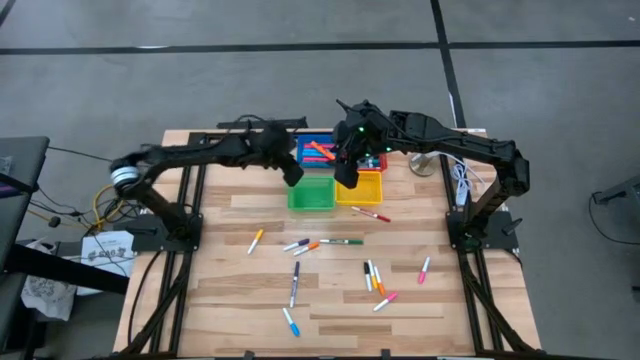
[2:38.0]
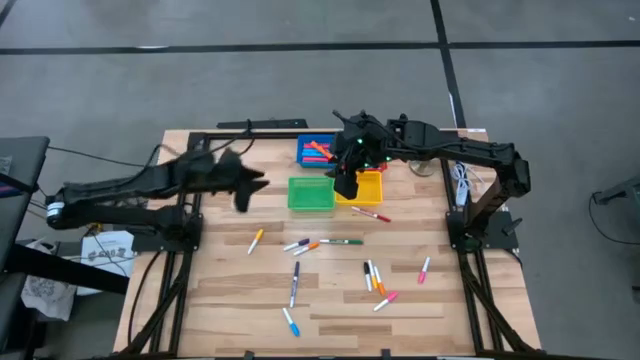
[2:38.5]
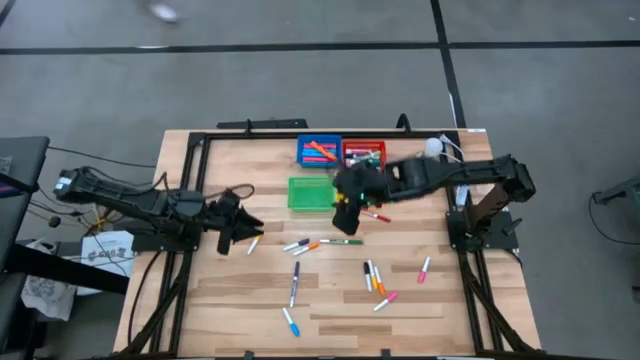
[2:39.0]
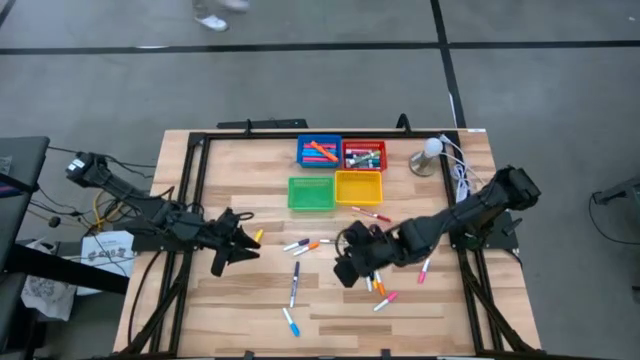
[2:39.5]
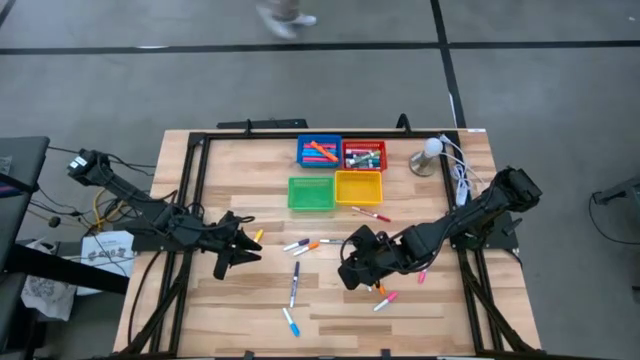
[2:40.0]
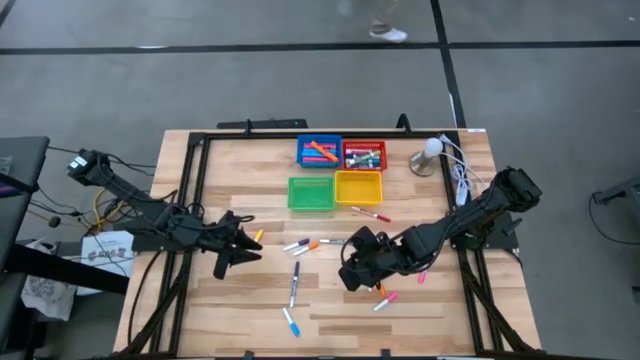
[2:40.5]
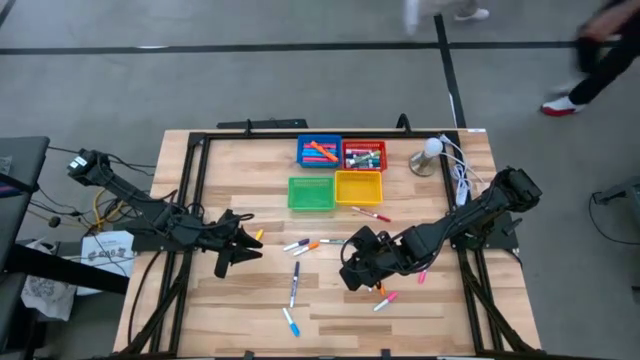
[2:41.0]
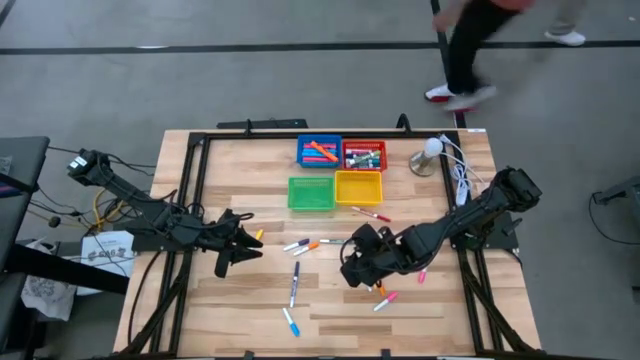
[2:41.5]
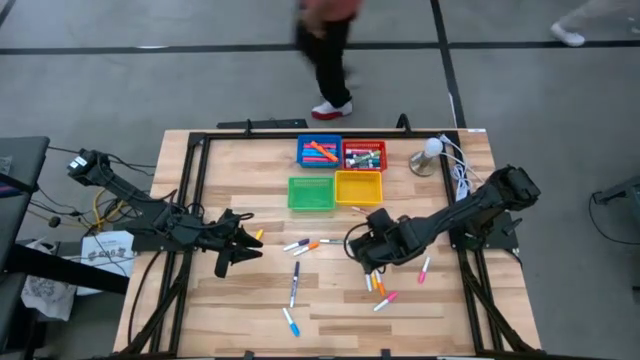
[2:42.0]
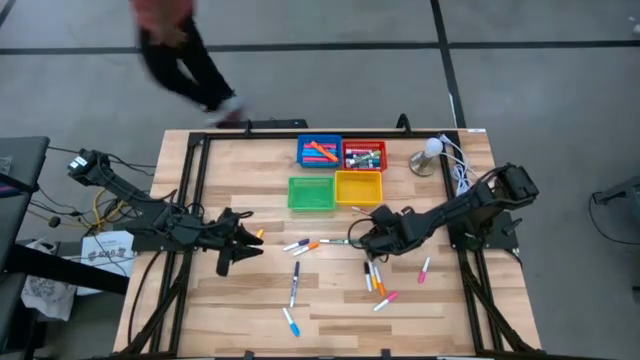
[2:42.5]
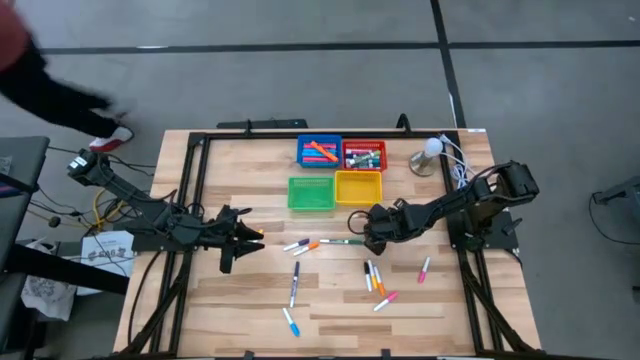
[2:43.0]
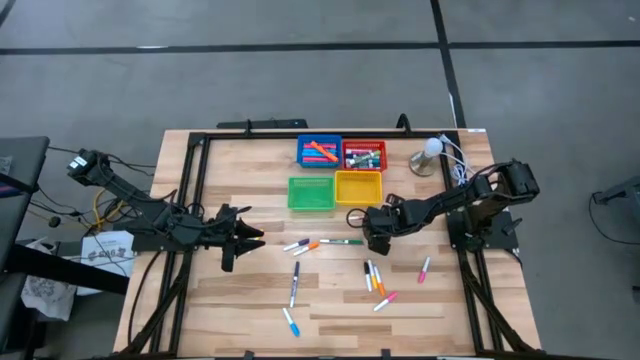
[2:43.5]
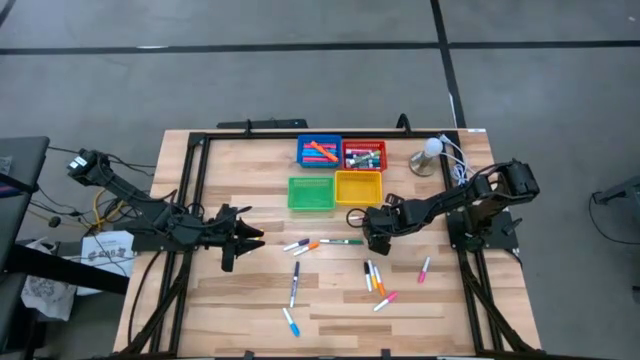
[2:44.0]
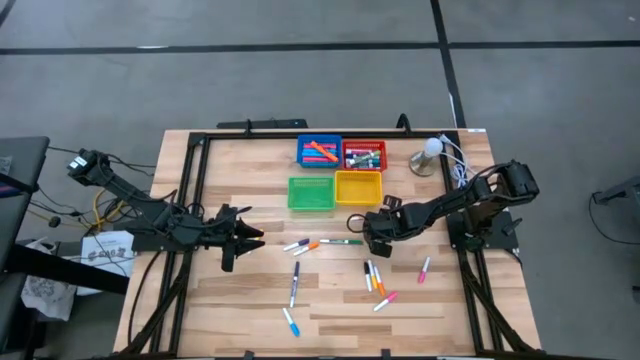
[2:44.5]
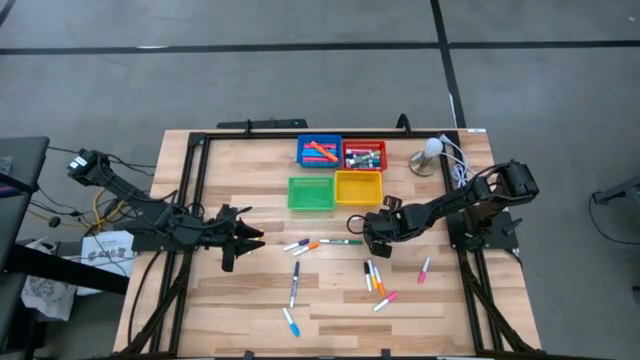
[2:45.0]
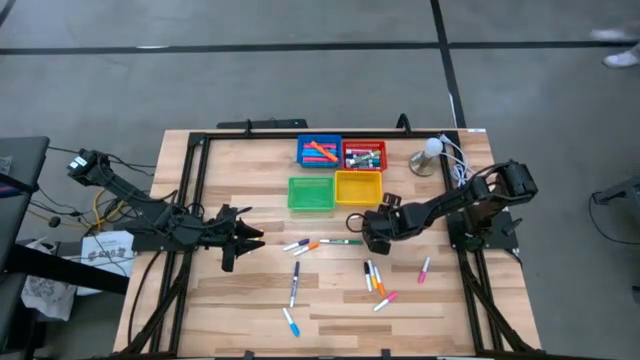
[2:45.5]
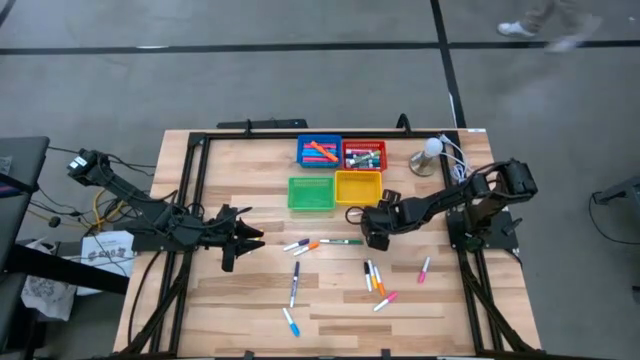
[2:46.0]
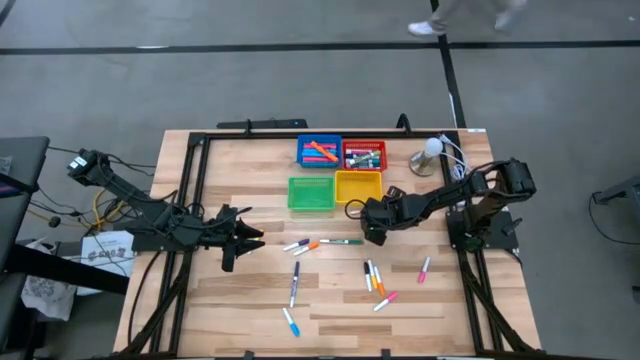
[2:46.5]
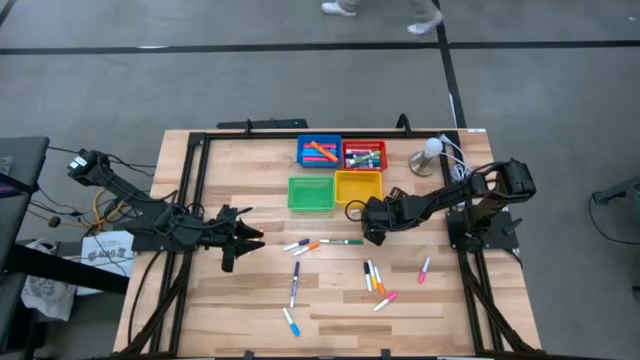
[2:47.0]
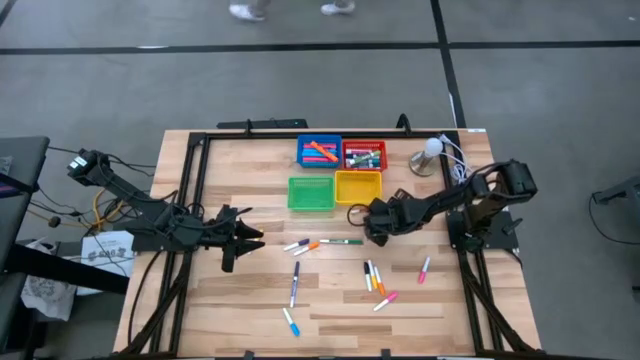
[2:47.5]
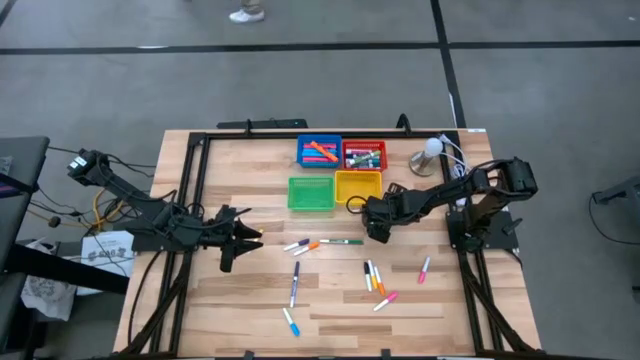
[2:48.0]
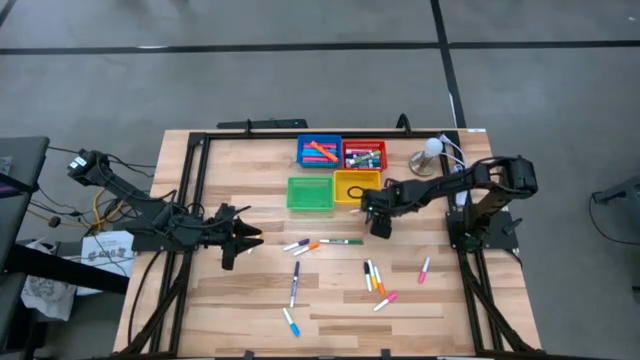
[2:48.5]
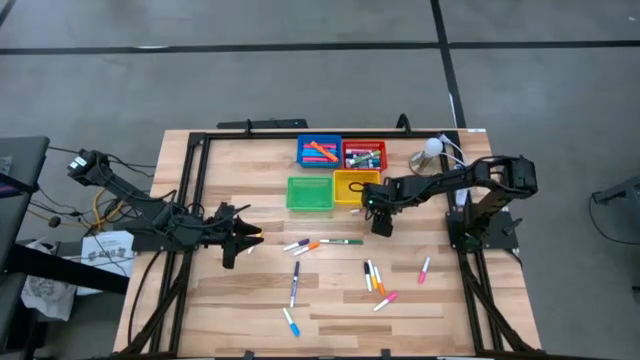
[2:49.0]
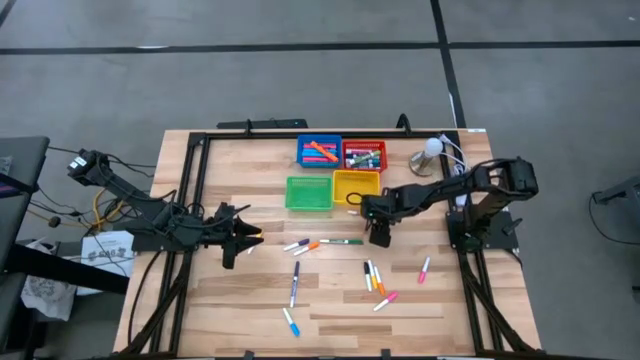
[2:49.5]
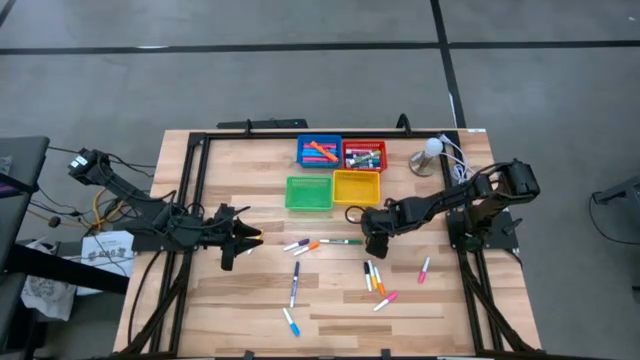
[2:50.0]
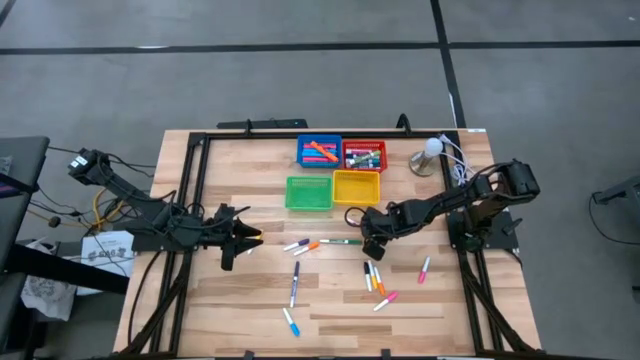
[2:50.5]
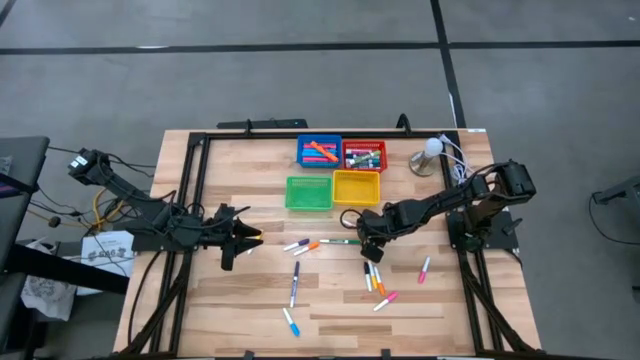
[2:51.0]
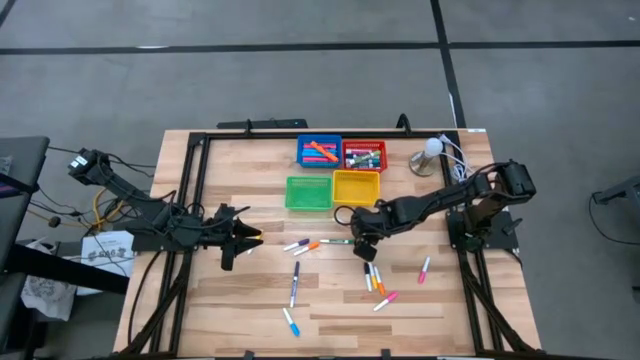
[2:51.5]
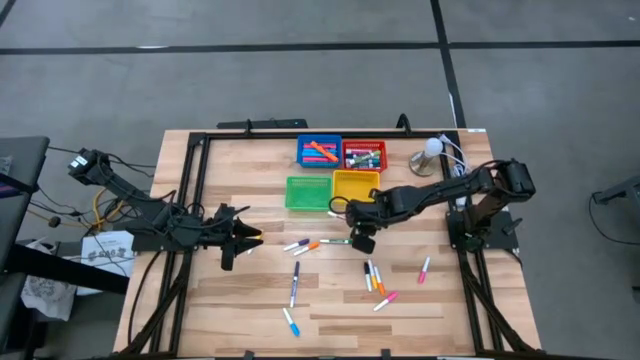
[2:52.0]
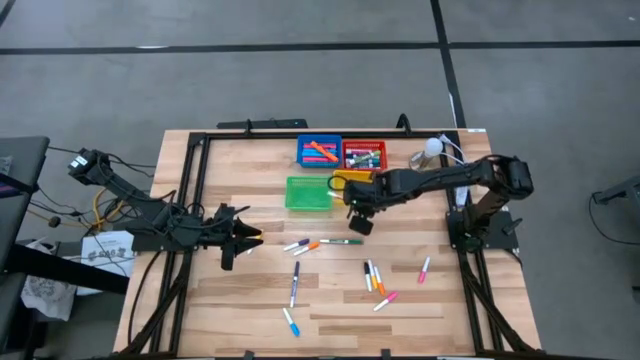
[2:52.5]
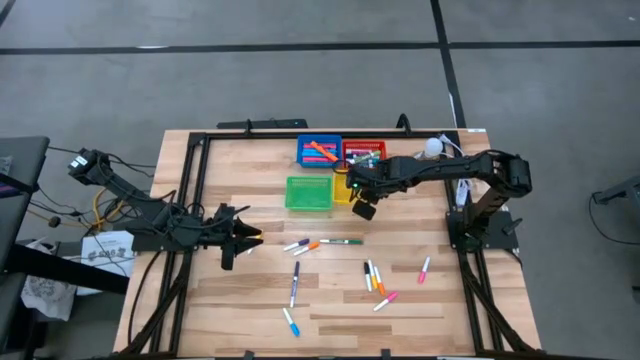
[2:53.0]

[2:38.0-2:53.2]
Task: Pick & Place Markers
Put the red thin dry erase marker into the yellow bin

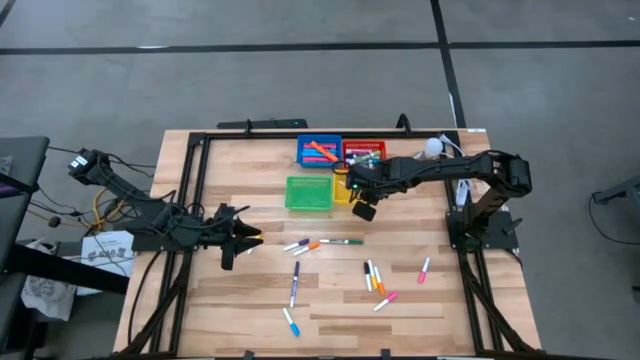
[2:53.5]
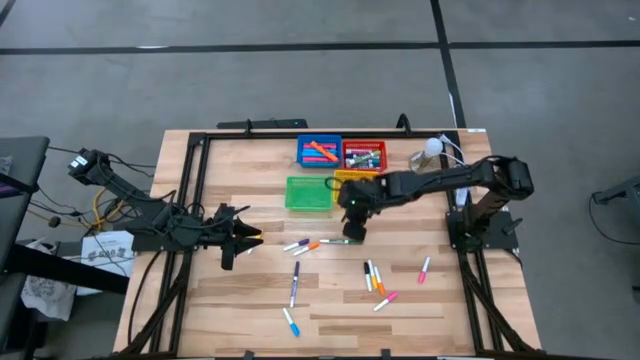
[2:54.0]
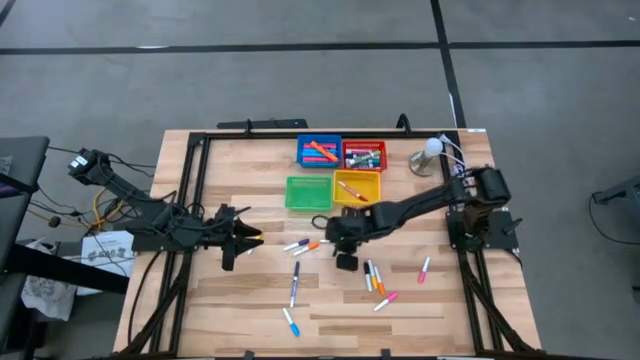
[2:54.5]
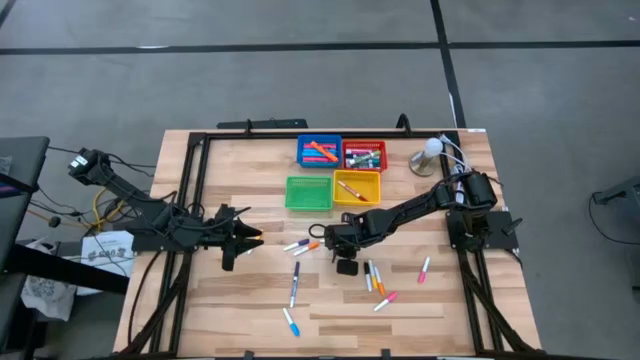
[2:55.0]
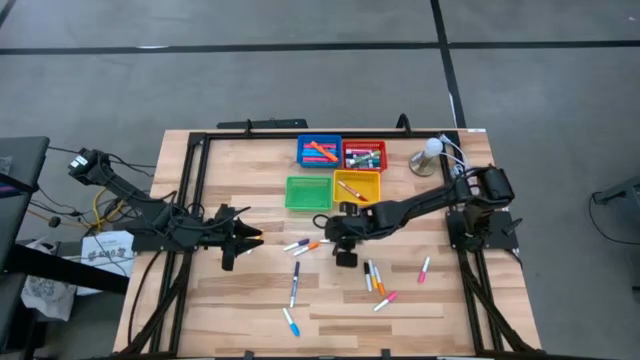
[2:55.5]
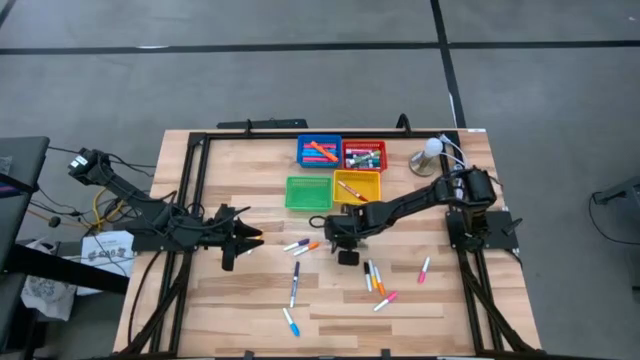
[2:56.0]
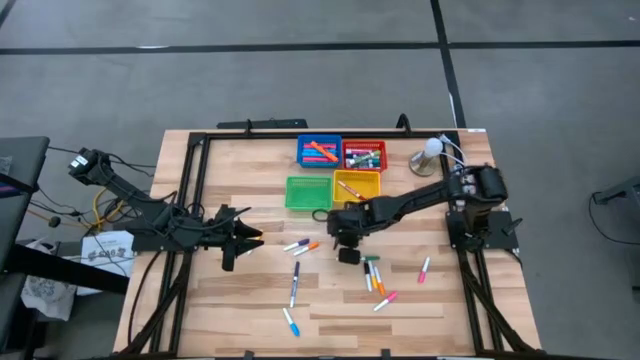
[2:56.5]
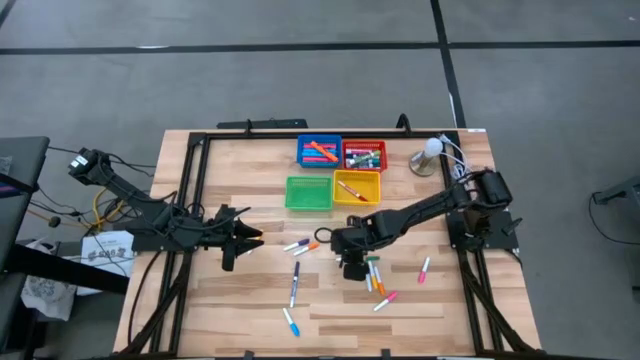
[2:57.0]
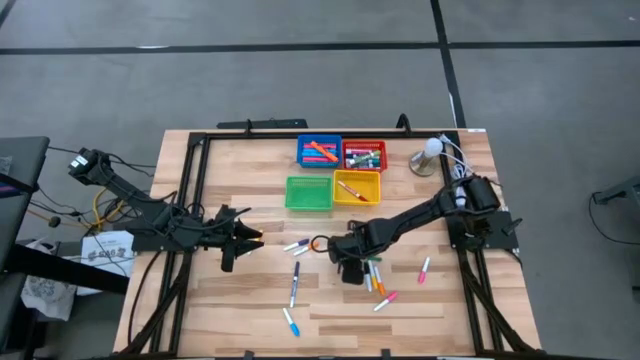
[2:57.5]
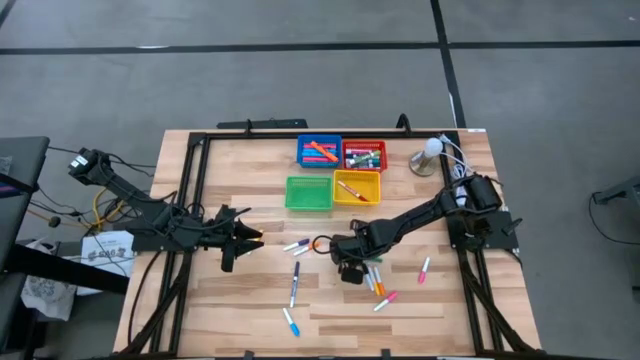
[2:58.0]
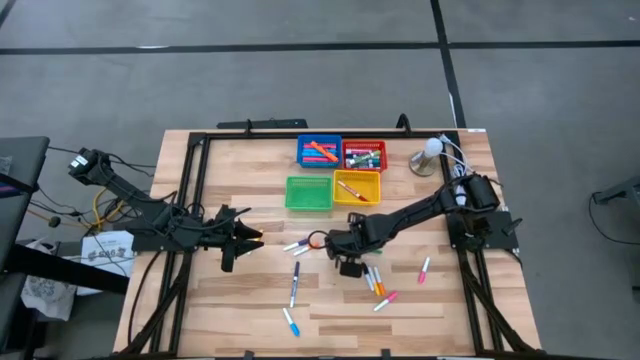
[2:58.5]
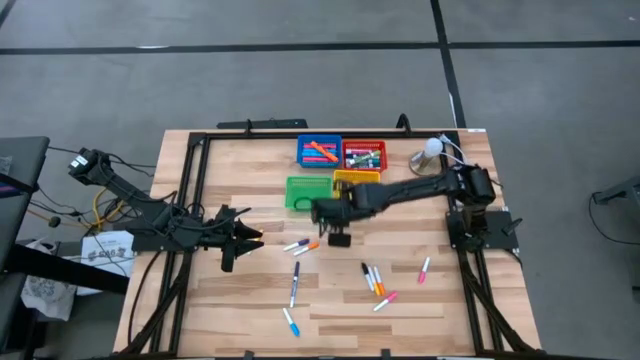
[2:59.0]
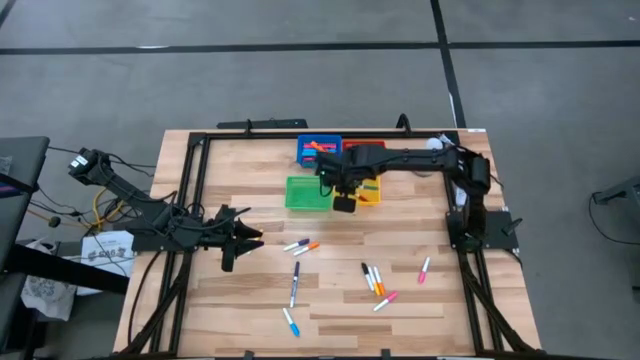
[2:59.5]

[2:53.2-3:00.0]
Put the green thin dry erase marker into the yellow bin
